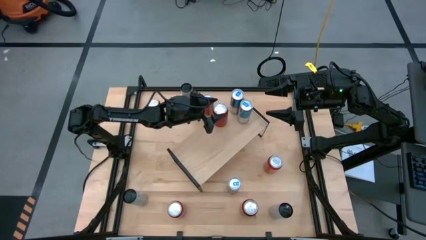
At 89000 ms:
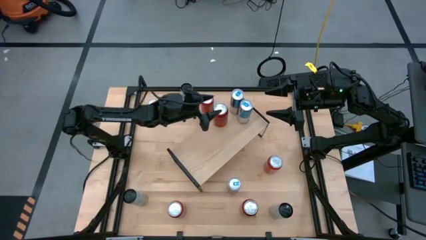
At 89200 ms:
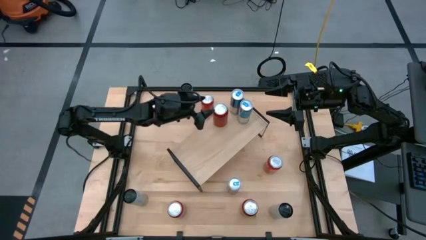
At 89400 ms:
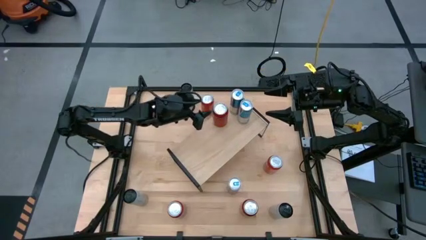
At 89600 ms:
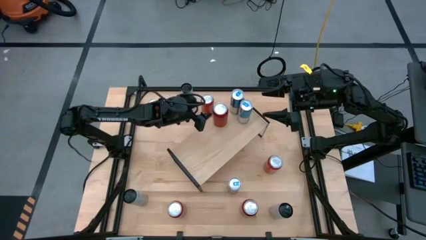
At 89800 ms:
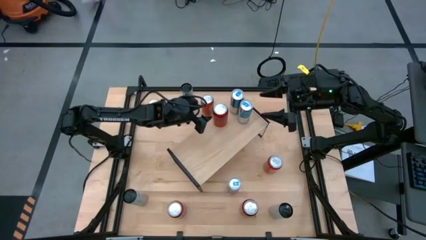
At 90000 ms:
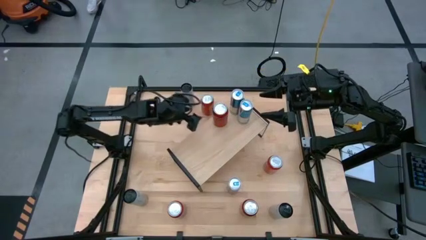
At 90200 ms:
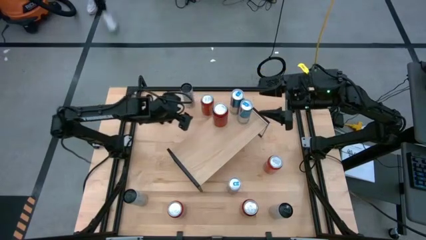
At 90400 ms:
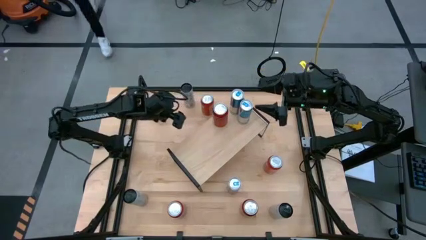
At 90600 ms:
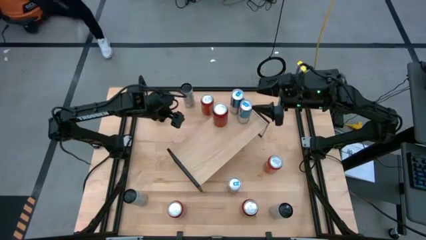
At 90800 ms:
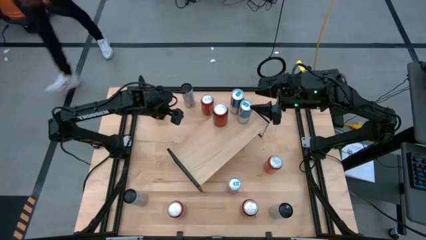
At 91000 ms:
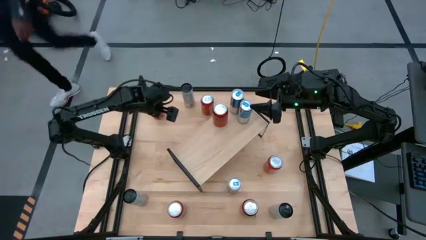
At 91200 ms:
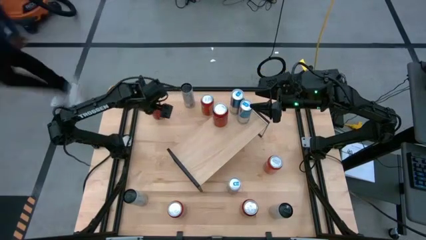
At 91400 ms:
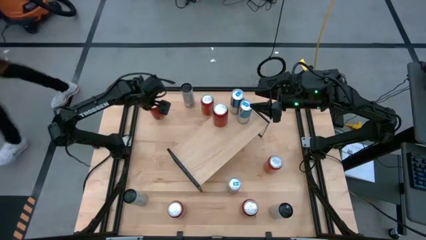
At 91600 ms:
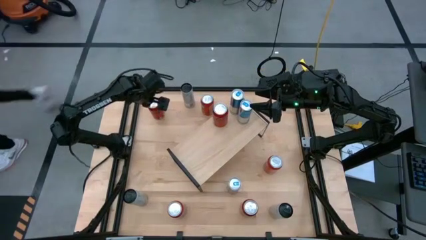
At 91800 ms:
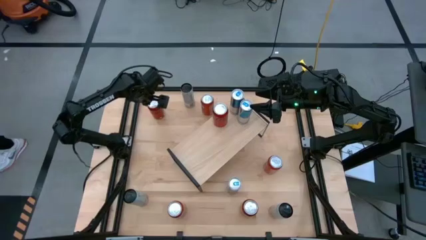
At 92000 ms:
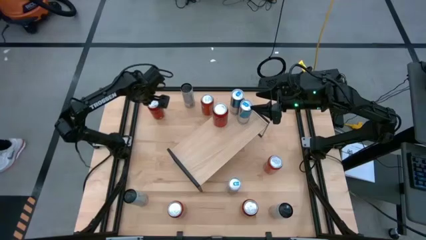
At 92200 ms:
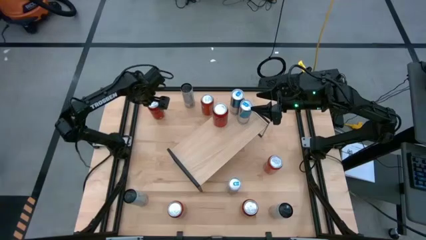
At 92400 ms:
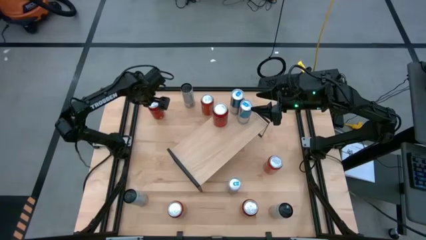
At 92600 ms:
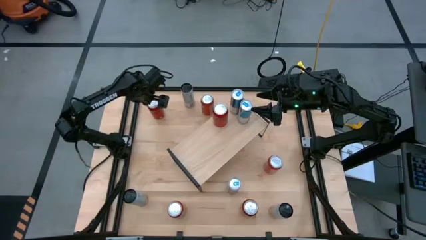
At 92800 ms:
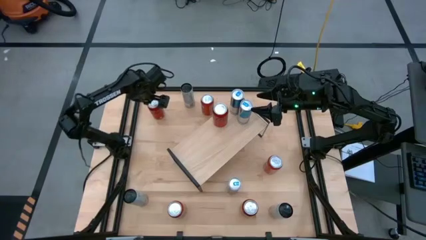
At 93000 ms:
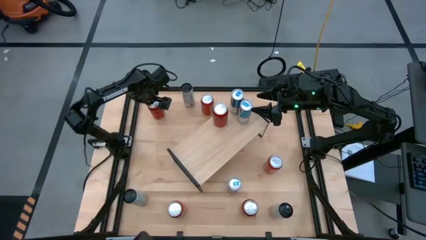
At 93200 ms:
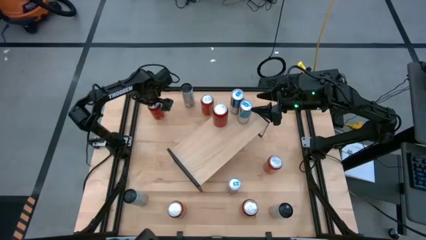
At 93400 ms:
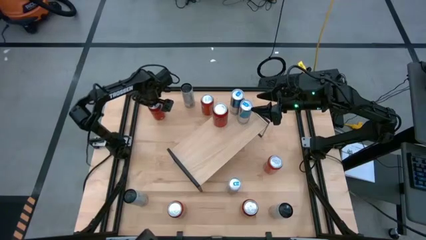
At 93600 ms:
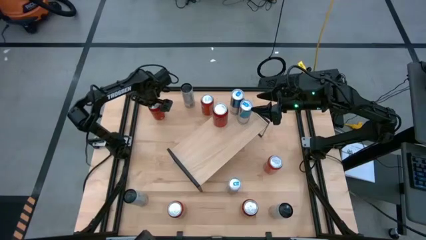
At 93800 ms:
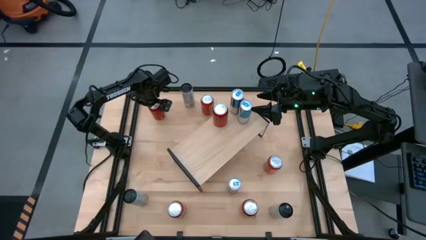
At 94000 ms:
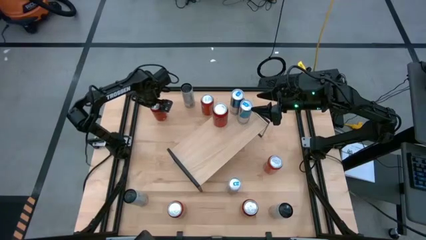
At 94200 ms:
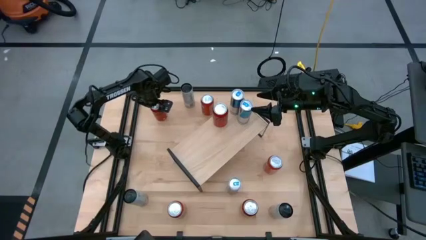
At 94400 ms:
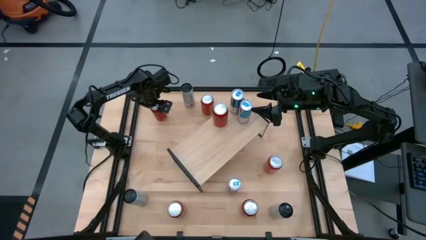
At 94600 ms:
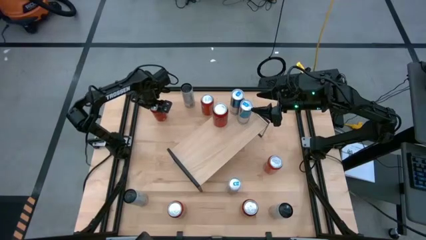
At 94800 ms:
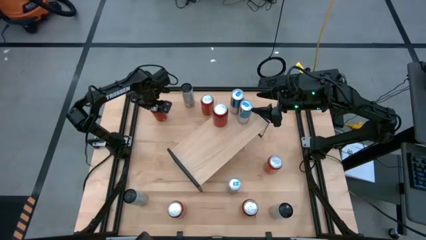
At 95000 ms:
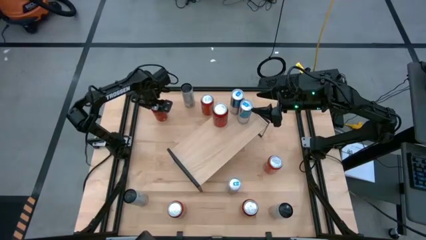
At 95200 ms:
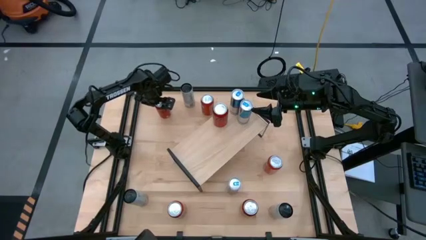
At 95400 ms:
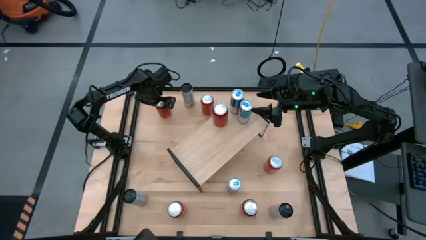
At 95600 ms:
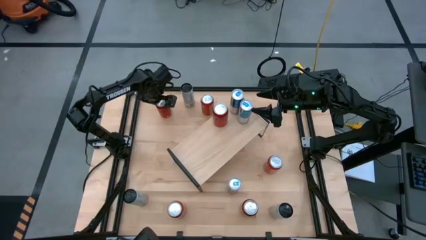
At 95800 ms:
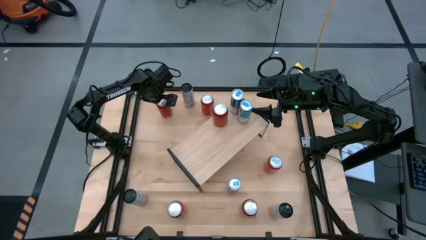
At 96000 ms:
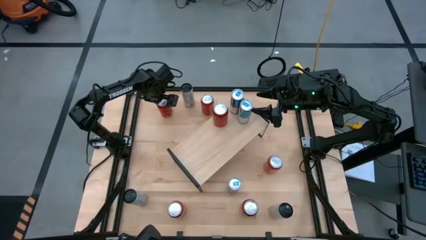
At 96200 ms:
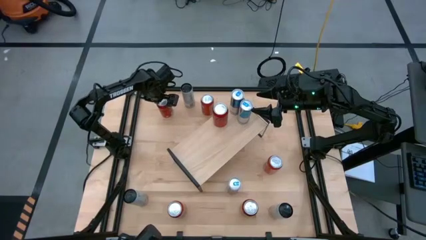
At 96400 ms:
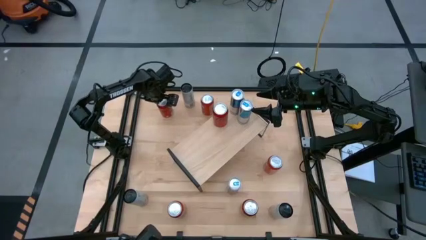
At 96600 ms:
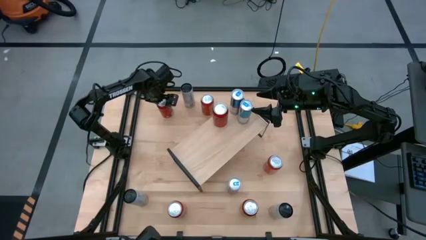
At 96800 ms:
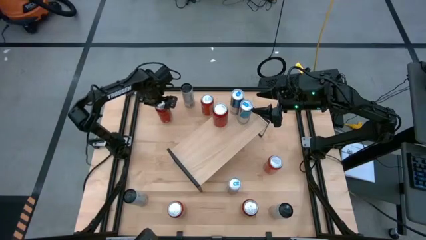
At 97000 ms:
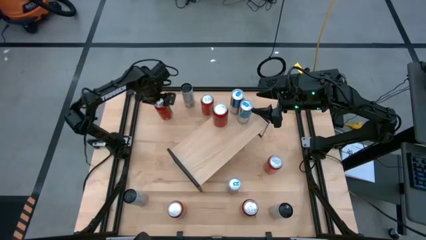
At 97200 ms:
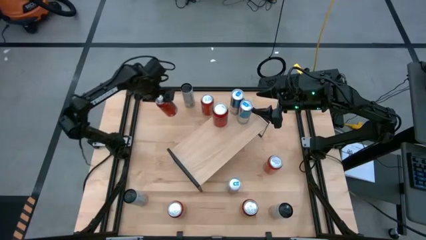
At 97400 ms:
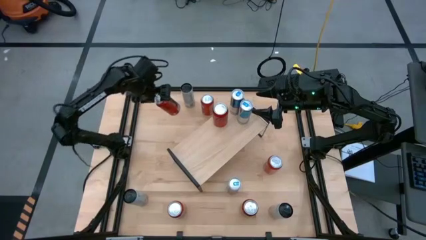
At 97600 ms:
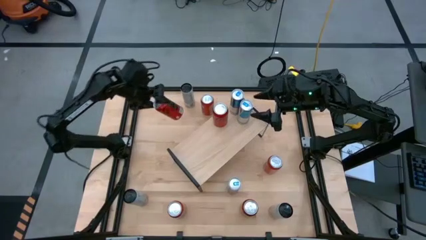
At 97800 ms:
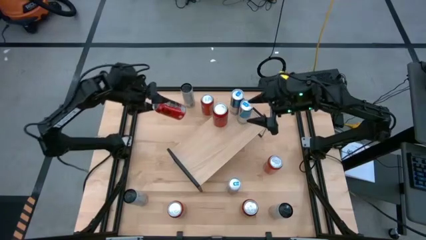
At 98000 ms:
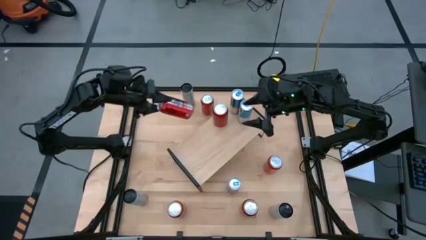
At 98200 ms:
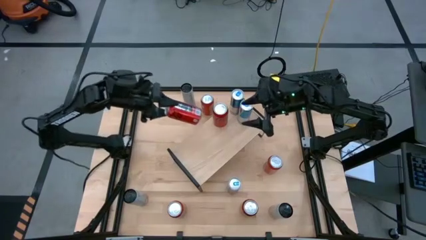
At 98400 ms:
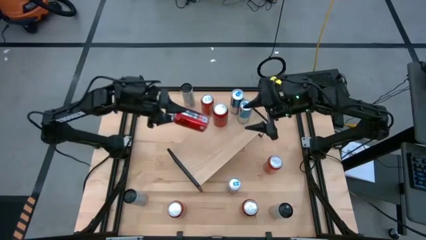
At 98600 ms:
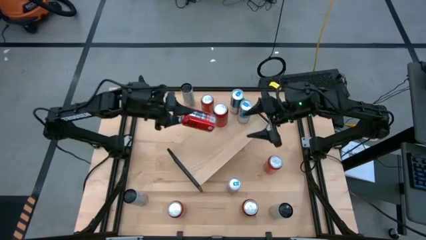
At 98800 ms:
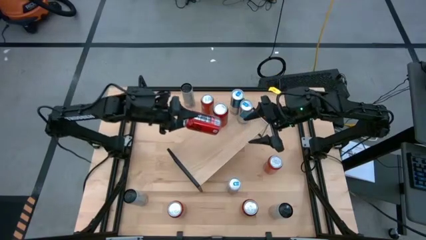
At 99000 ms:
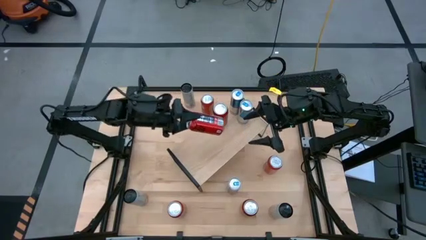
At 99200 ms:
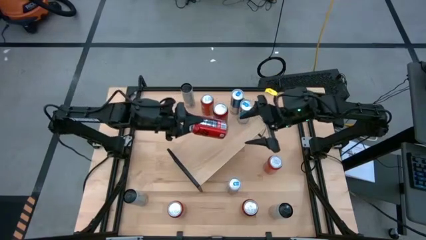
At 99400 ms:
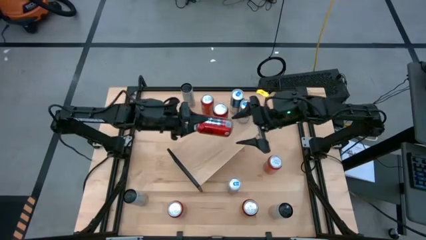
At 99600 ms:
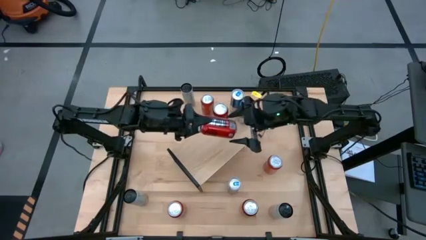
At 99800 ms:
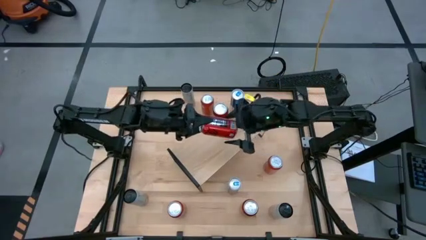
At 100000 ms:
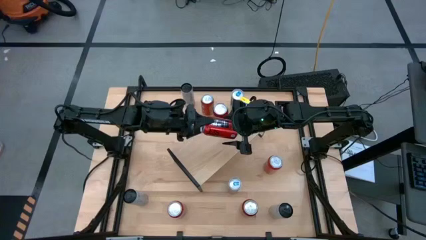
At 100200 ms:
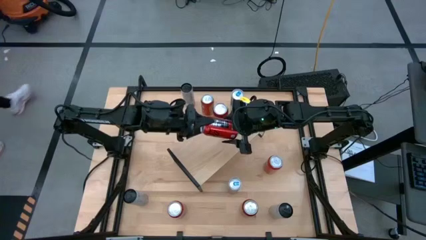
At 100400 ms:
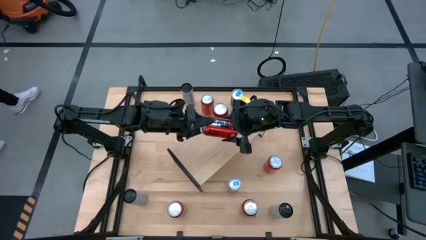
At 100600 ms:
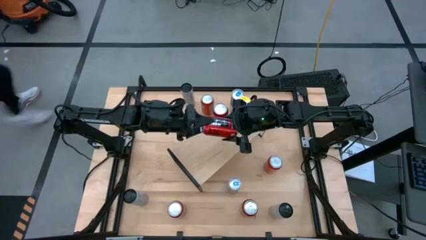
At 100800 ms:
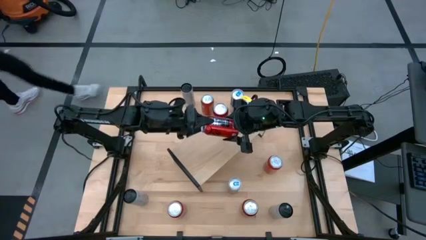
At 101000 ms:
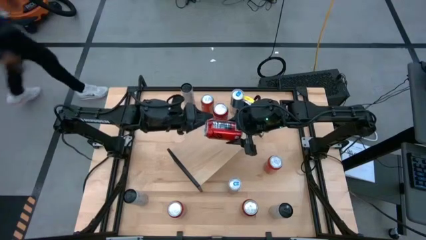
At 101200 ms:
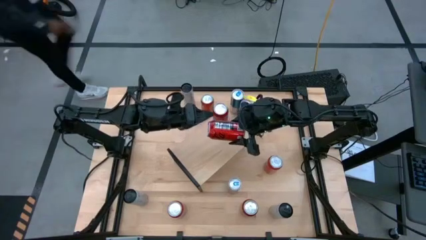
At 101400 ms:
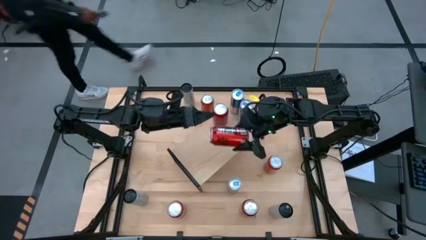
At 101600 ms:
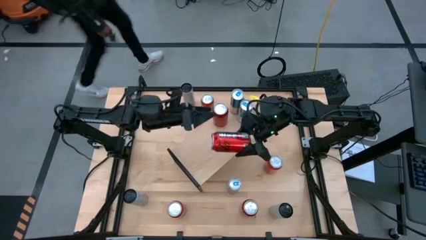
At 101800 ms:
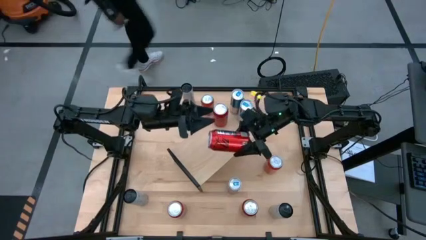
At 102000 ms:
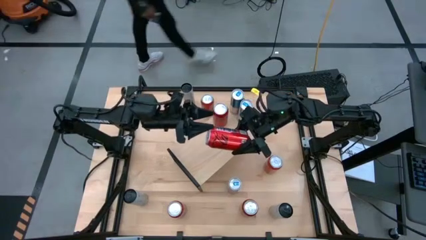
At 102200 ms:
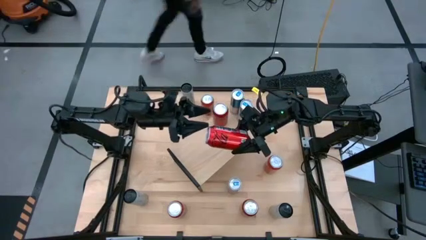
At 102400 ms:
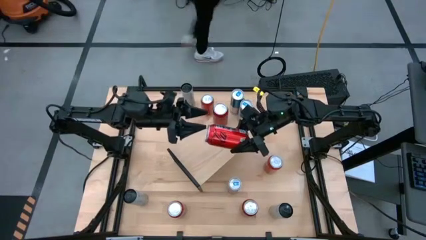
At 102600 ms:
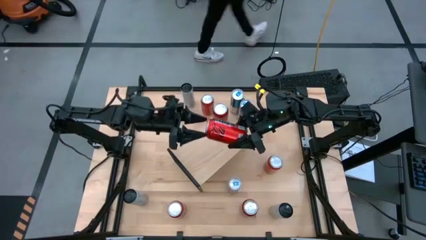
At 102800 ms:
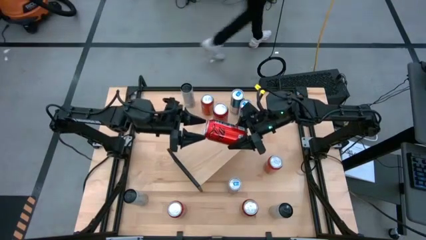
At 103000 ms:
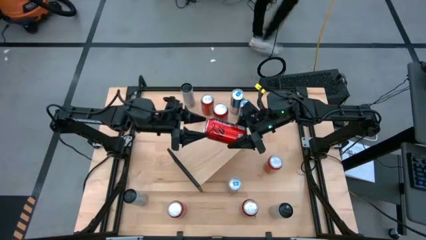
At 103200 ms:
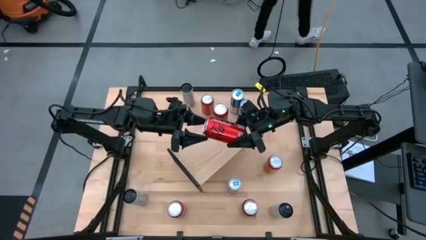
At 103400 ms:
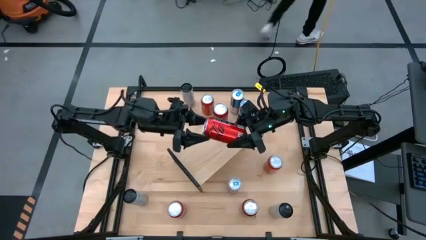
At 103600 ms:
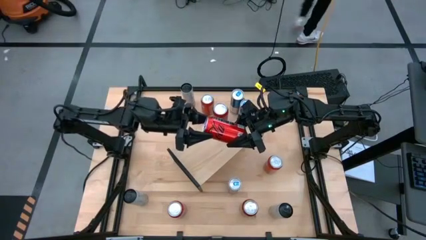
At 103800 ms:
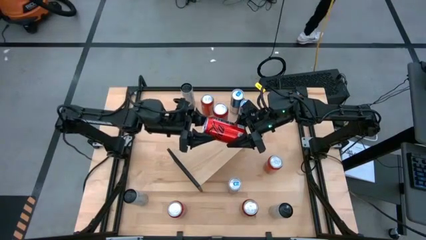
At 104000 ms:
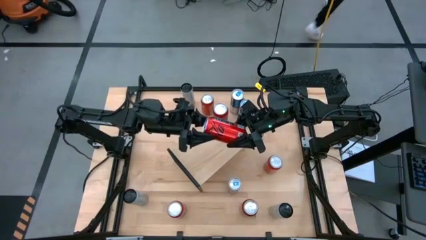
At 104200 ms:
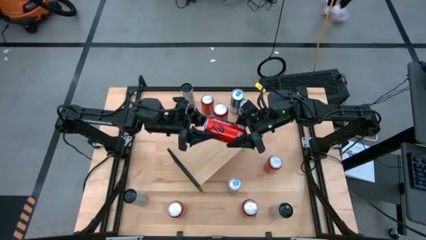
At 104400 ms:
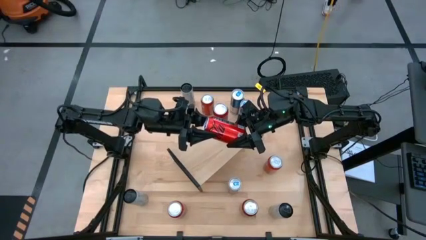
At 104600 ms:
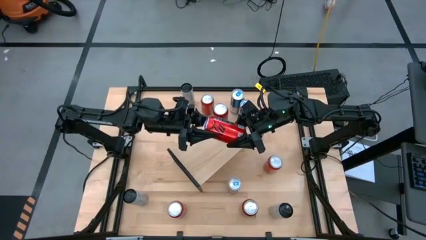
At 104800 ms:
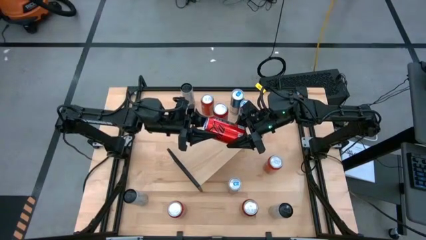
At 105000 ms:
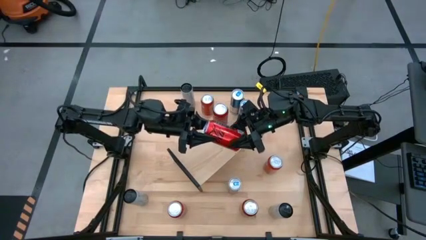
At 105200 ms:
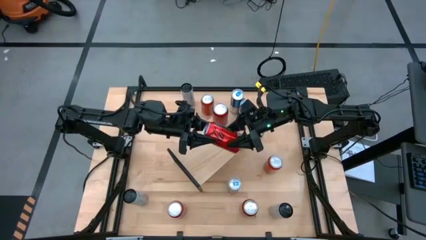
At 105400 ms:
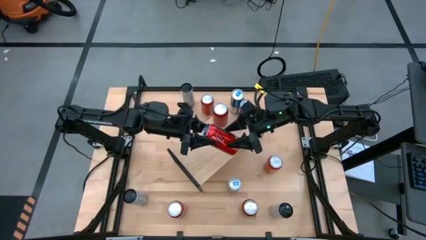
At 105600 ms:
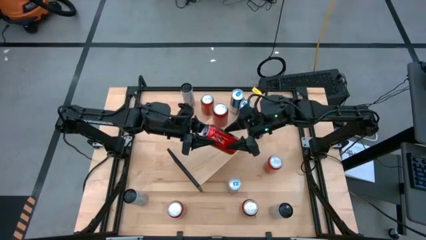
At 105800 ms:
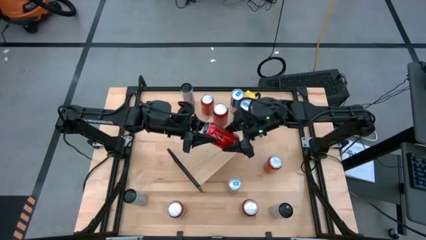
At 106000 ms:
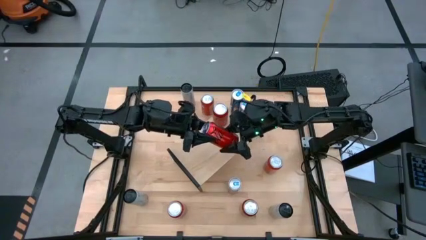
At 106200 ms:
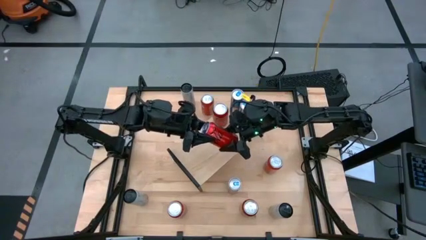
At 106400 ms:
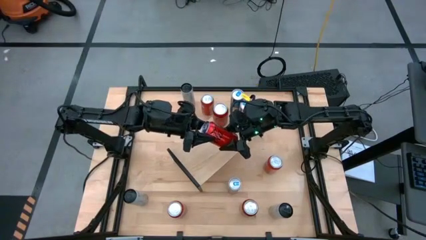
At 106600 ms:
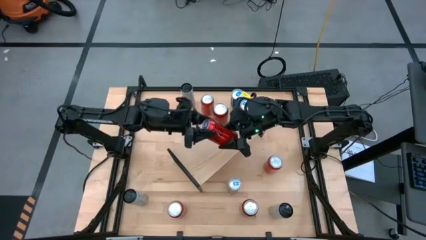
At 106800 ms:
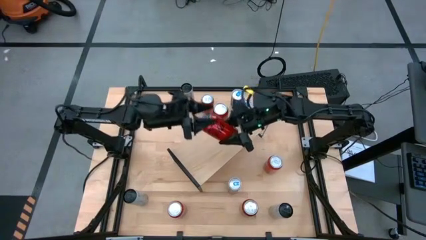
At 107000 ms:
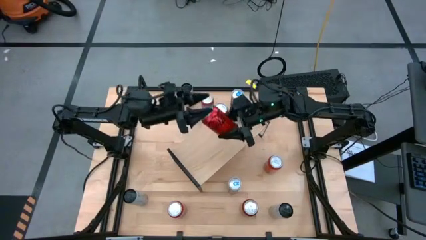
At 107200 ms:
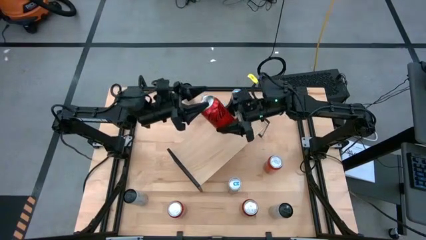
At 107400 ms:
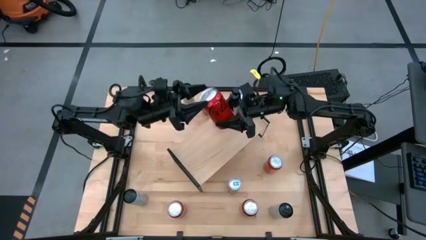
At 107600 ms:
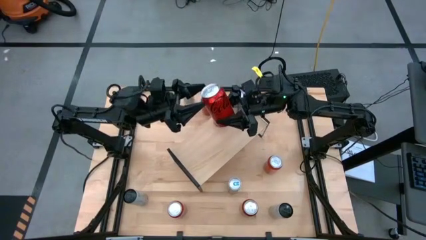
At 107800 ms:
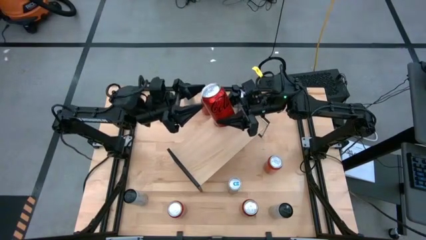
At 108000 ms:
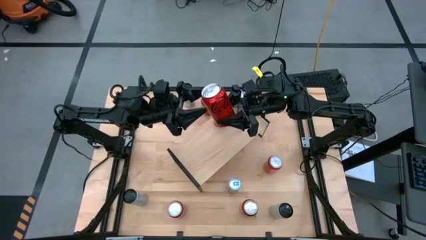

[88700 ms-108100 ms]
Task: Place canned beverage on shelf
Put the top red soda can on the shelf
